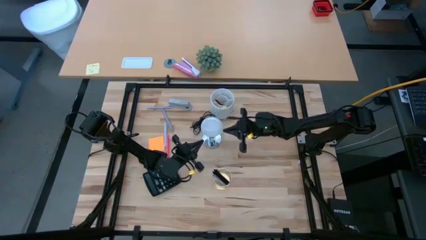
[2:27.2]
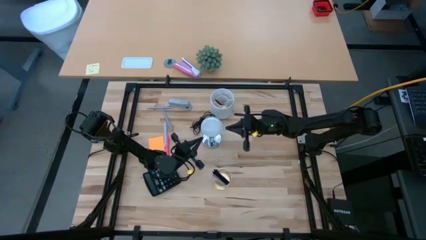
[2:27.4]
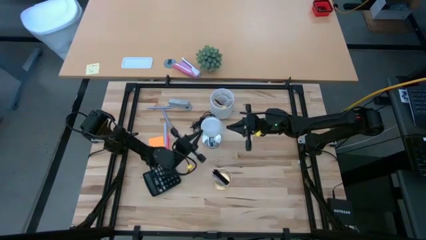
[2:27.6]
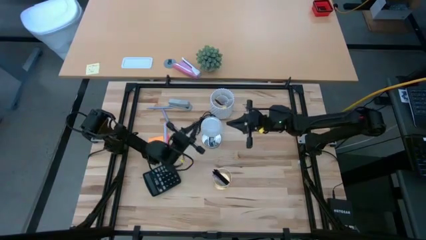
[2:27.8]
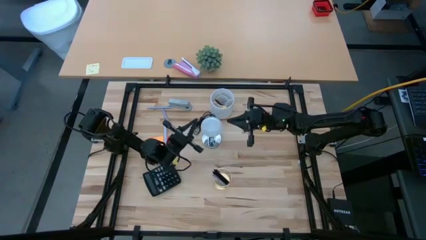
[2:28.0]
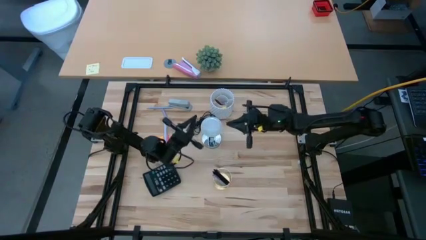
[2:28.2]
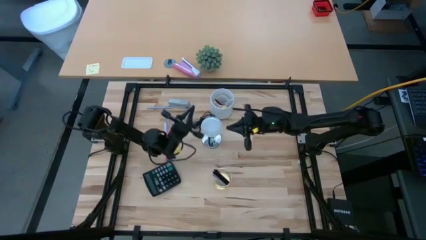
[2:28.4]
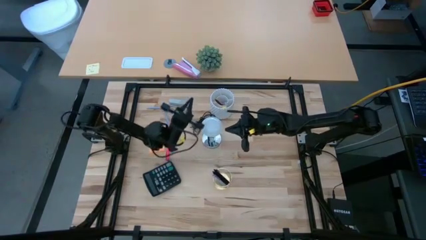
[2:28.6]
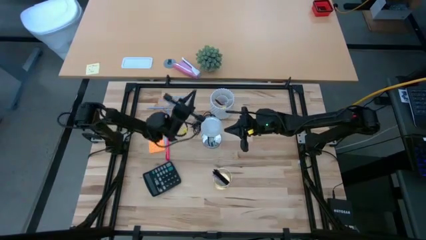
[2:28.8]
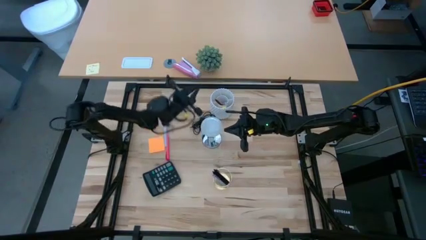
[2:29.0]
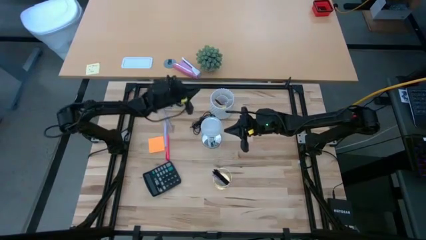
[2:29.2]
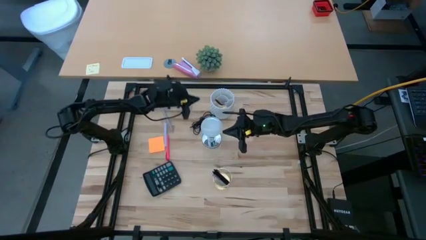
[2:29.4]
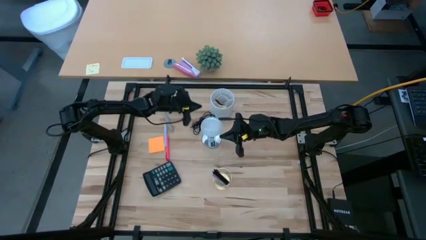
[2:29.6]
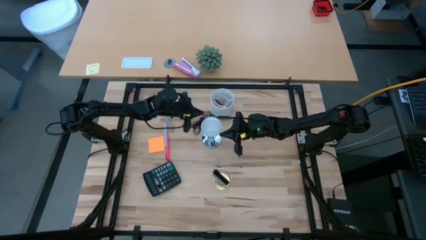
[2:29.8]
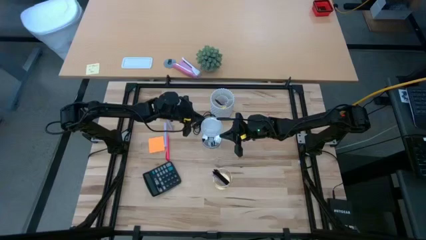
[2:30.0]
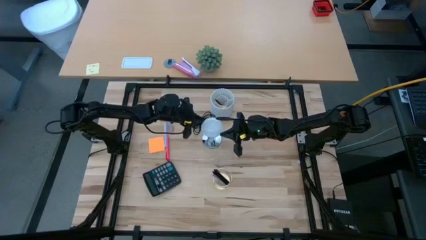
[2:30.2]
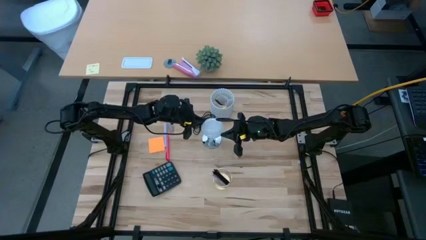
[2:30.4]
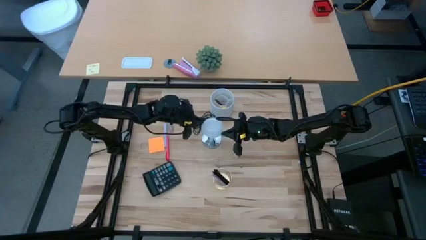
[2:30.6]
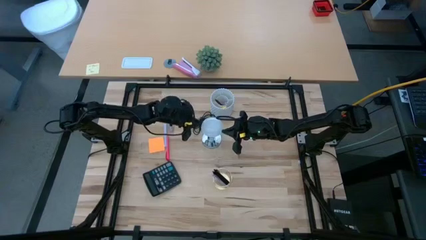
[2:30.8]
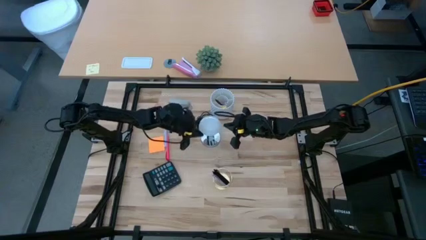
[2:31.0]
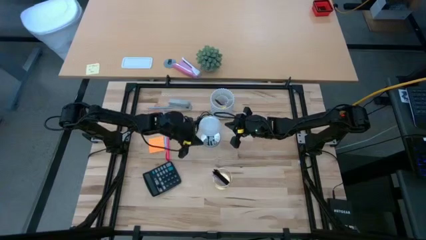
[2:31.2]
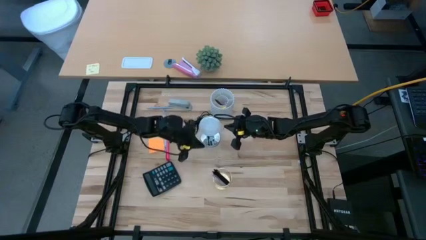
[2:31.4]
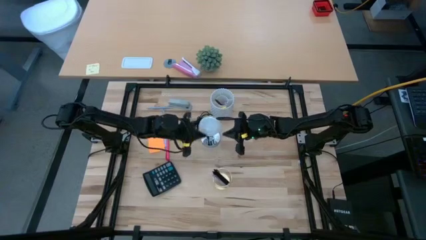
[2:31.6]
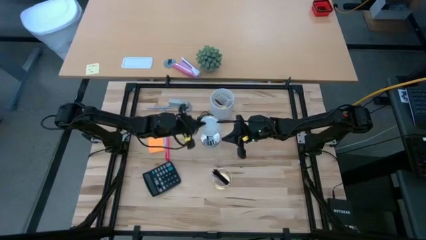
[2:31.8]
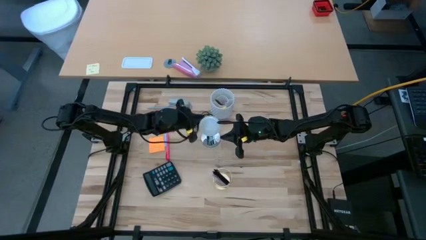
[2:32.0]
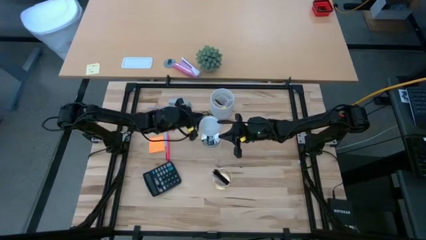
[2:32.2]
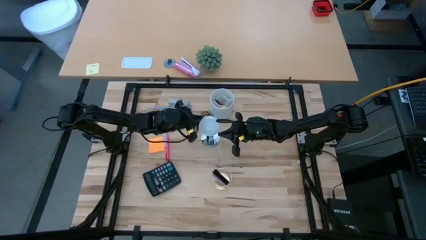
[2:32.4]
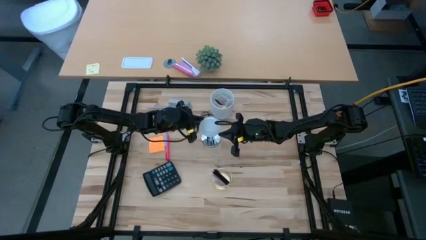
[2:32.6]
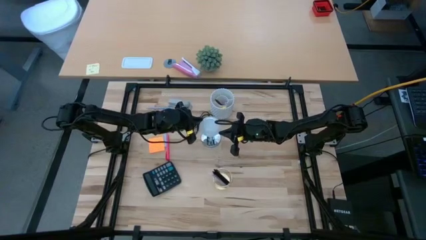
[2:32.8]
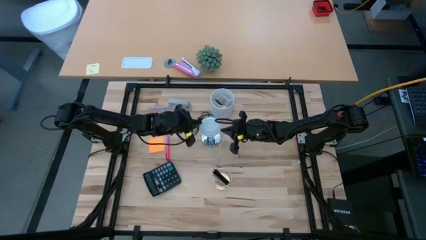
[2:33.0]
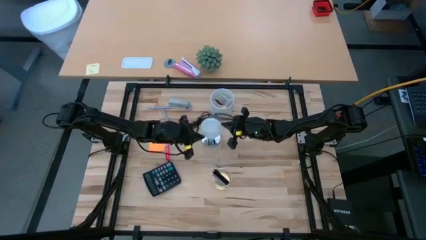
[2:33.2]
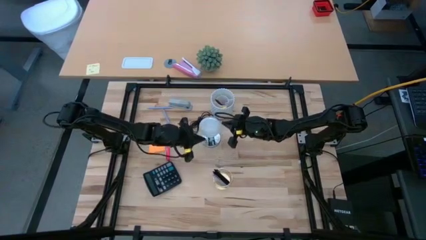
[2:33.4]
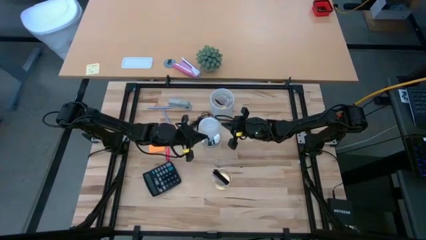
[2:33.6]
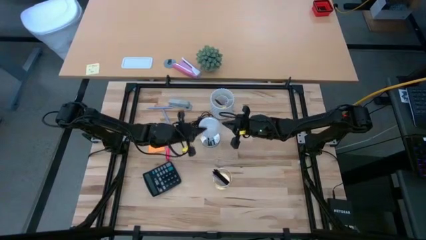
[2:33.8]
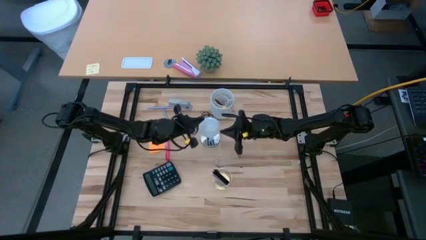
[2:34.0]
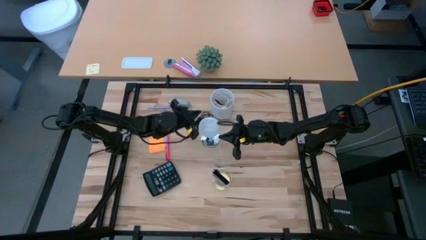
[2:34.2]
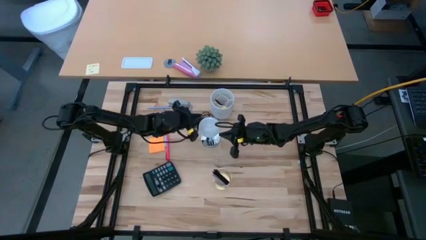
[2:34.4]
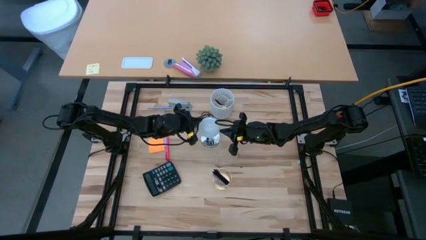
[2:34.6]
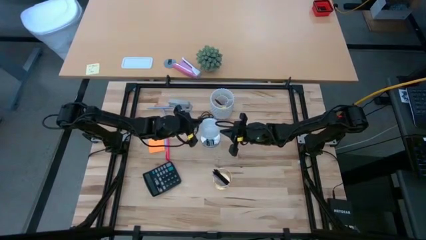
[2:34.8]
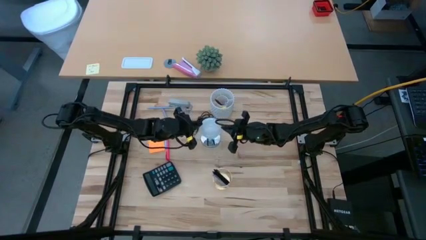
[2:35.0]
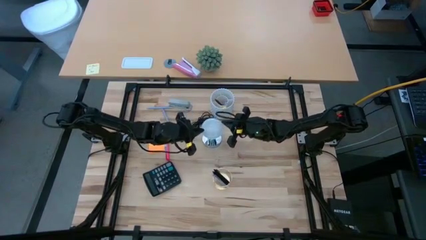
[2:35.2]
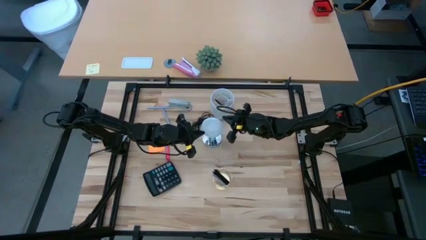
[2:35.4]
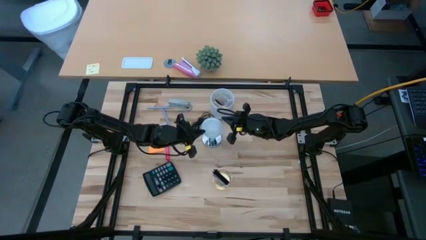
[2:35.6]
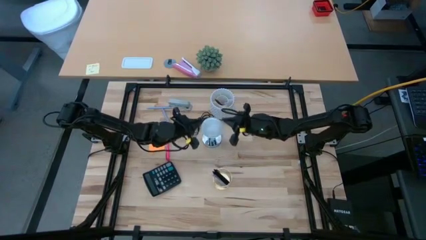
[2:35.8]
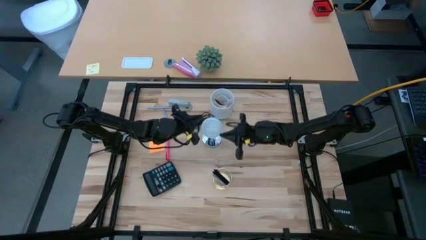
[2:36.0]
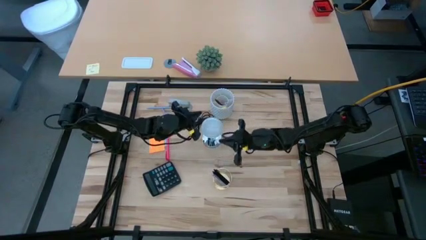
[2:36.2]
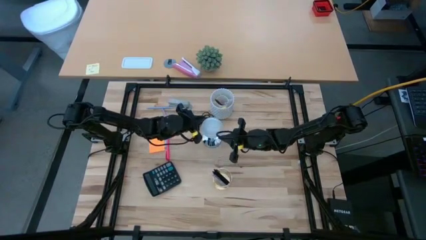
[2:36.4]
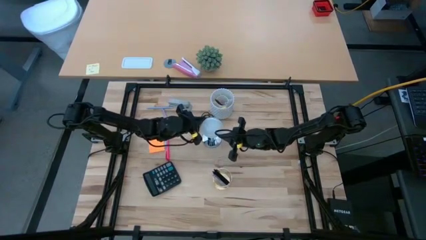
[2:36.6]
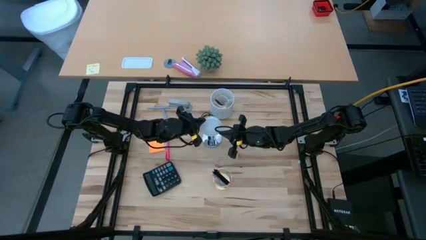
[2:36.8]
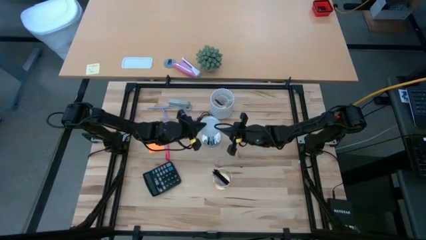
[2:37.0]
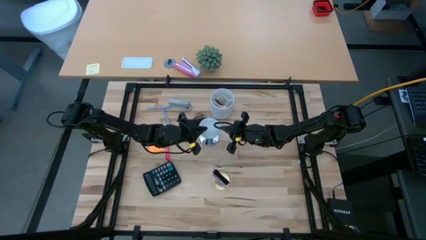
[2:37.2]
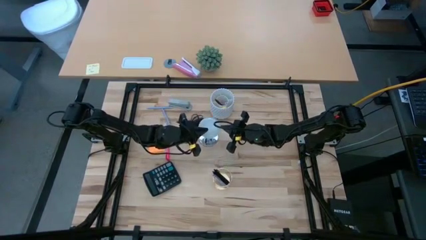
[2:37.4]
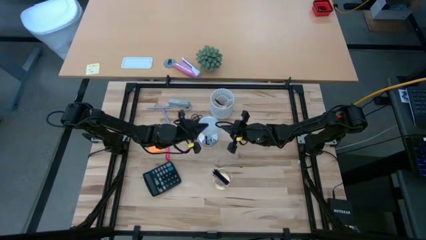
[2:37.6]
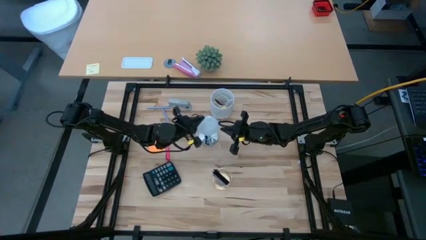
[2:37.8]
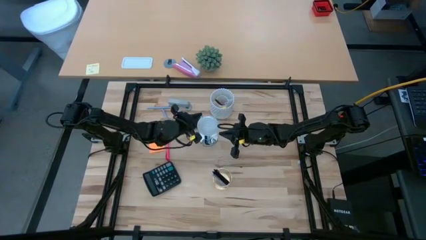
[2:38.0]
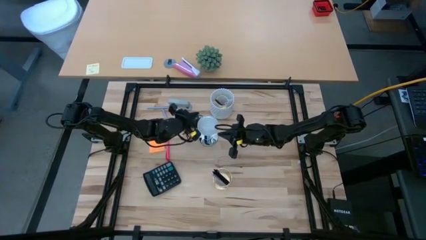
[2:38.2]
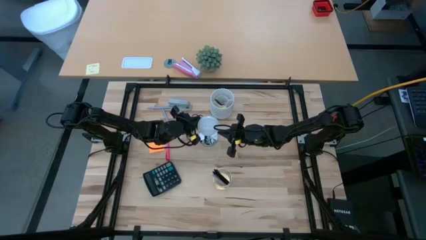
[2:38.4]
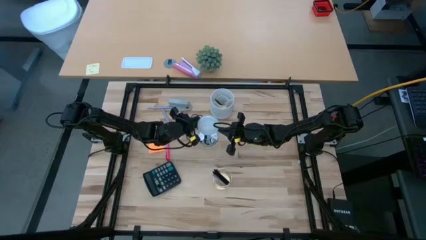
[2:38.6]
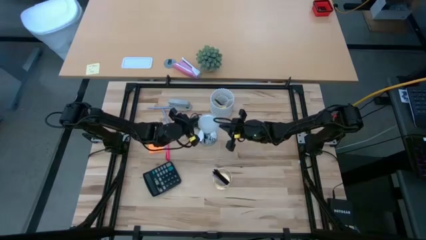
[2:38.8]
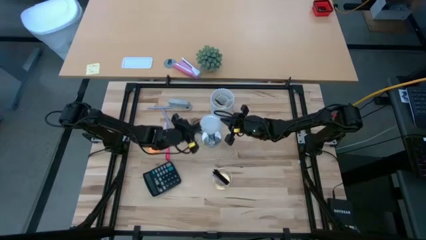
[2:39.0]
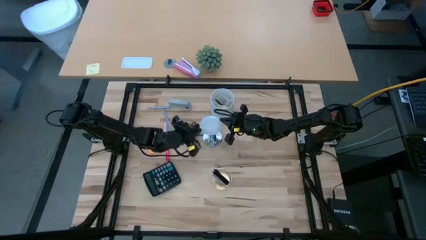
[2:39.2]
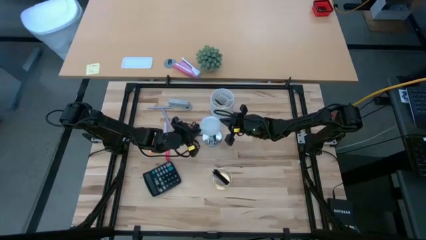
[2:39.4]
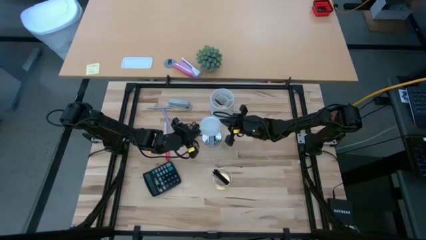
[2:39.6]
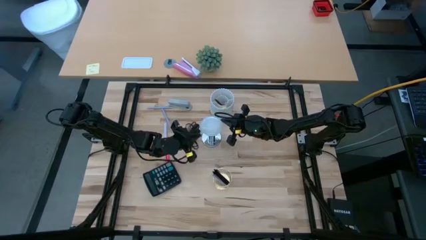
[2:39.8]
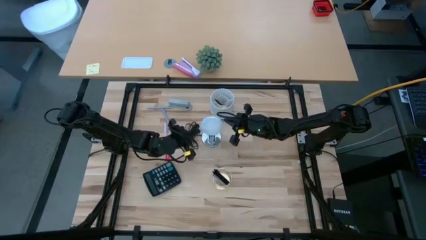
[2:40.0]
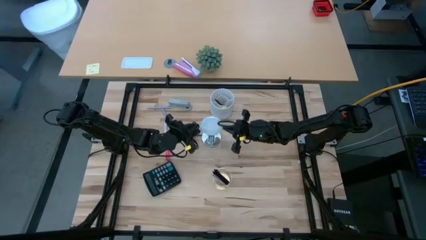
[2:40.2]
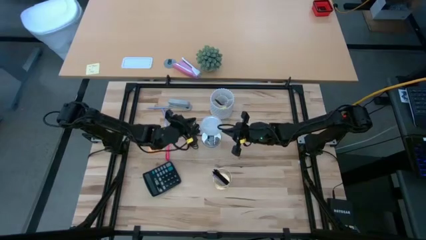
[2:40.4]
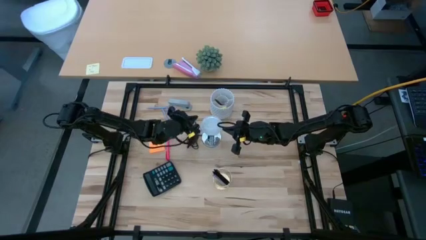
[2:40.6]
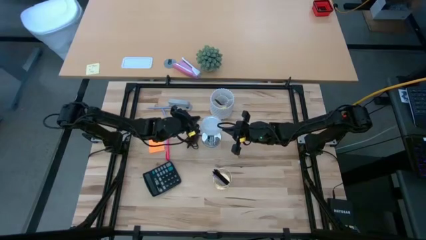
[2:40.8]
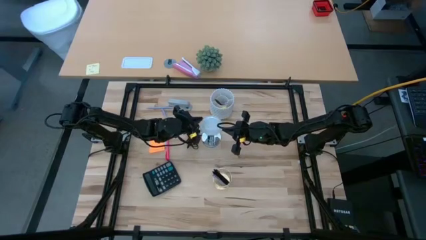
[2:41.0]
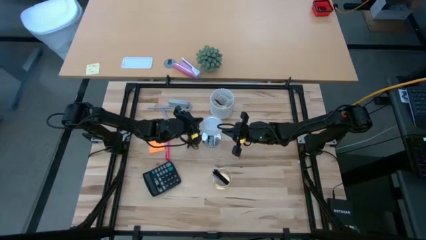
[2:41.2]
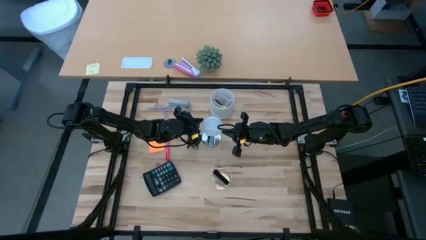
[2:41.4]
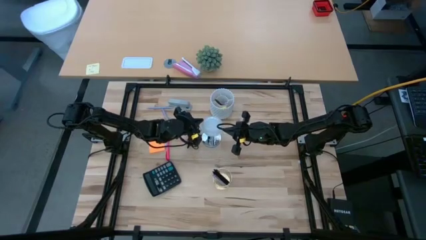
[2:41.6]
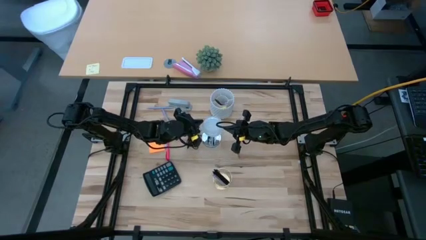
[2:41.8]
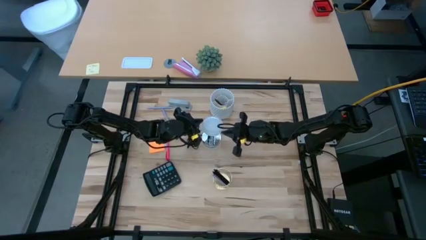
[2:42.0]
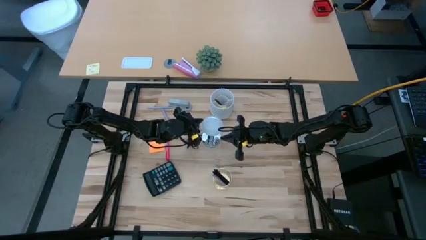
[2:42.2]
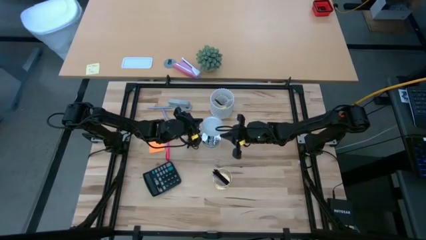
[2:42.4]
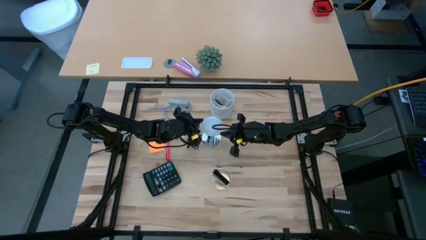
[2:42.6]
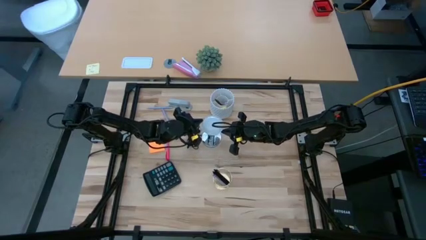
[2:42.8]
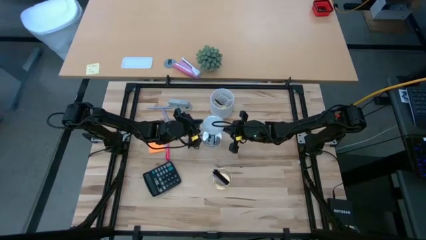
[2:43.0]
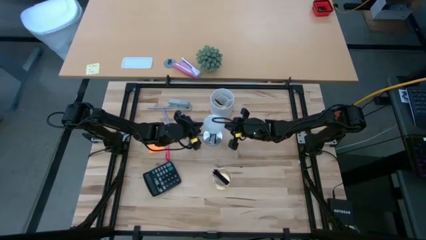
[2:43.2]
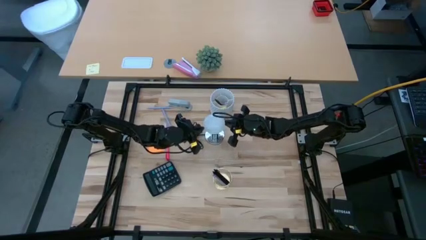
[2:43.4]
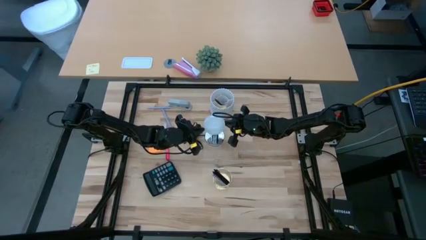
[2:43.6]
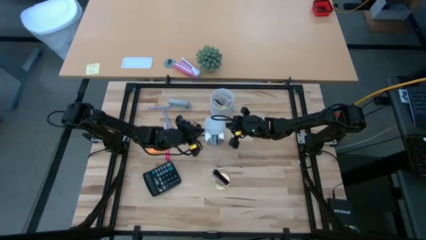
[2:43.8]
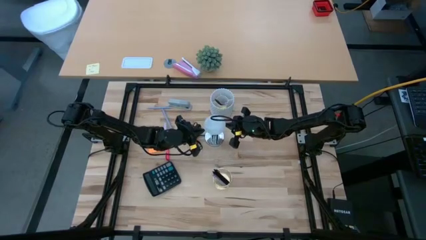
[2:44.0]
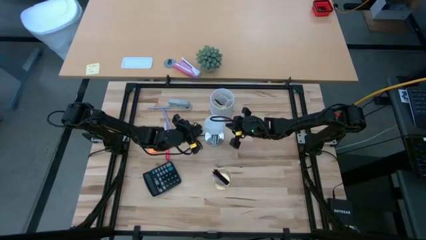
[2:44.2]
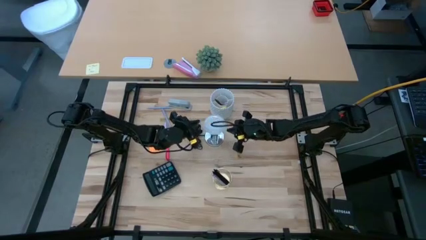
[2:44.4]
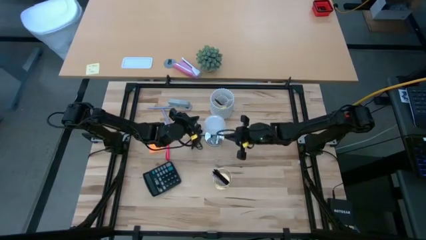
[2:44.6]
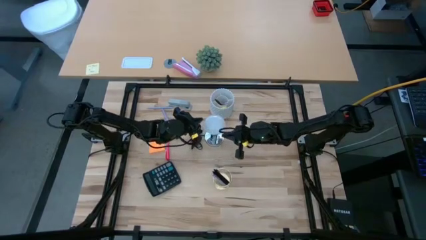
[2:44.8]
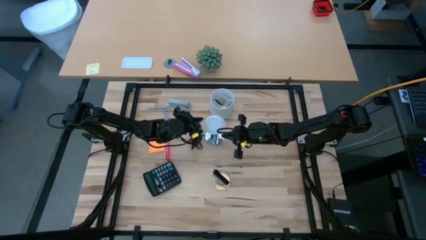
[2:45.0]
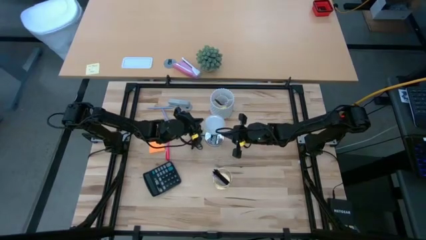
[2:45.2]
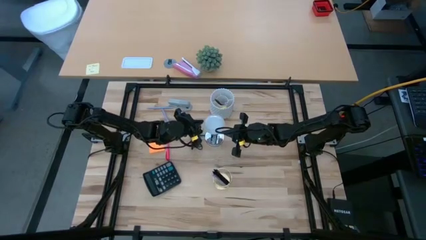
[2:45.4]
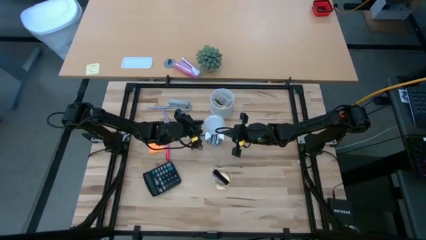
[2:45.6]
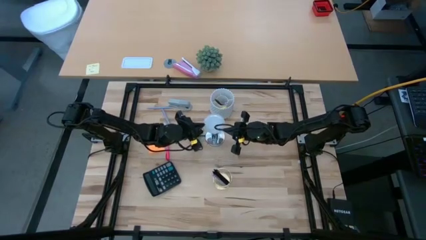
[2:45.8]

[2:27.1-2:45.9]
Task: Screw lightbulb
Remove the lightbulb from the lamp
